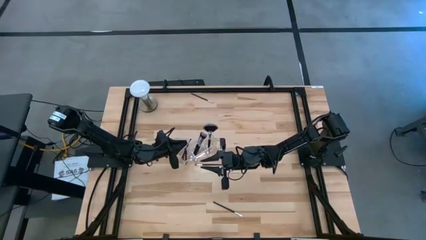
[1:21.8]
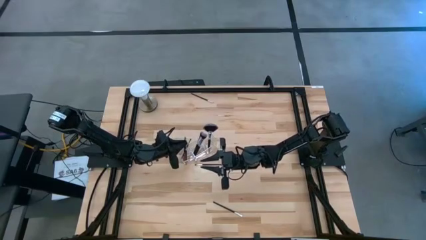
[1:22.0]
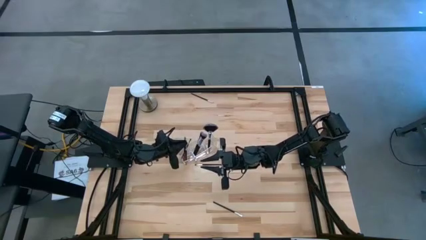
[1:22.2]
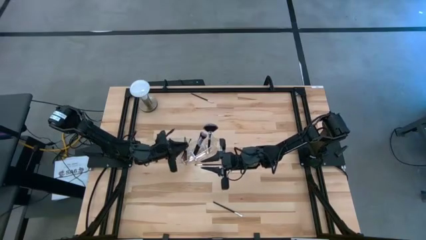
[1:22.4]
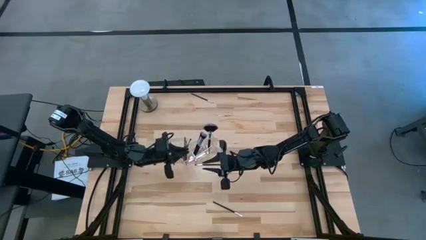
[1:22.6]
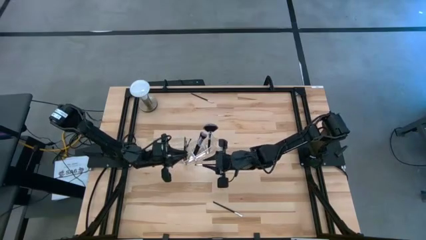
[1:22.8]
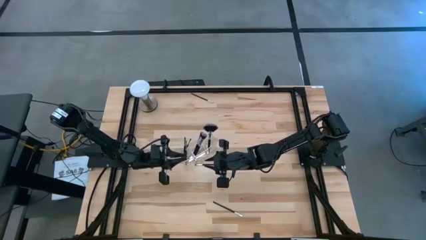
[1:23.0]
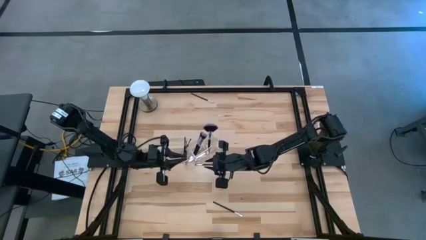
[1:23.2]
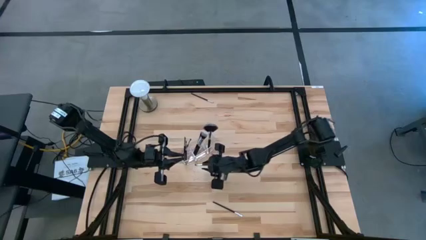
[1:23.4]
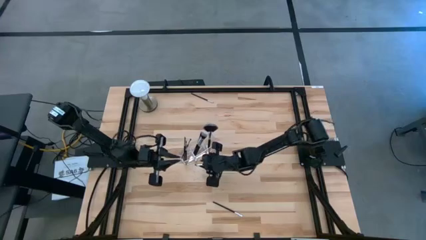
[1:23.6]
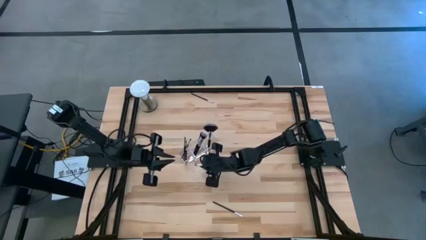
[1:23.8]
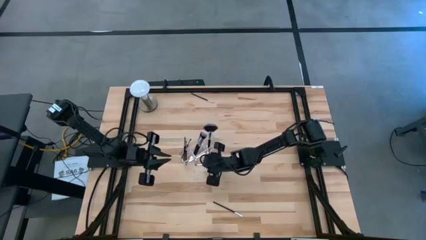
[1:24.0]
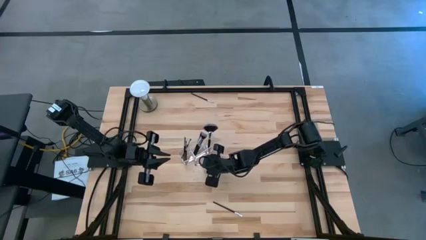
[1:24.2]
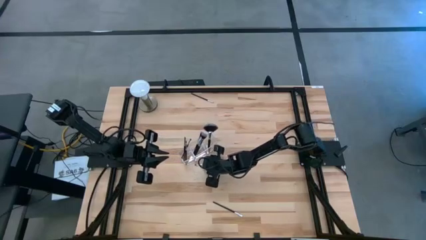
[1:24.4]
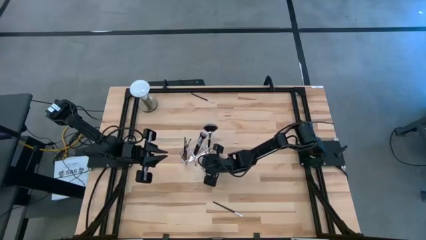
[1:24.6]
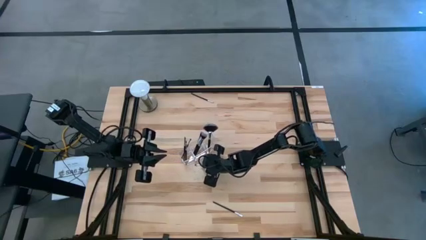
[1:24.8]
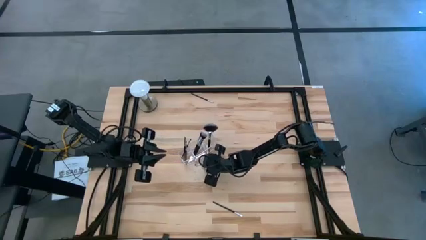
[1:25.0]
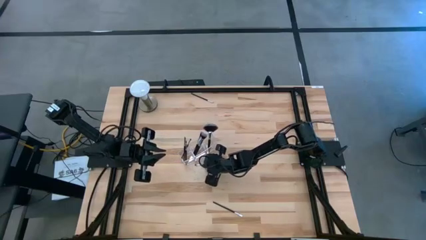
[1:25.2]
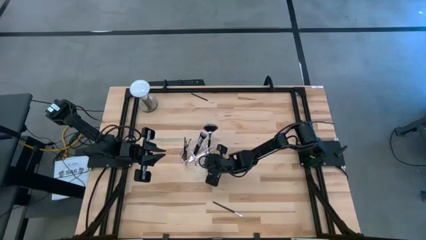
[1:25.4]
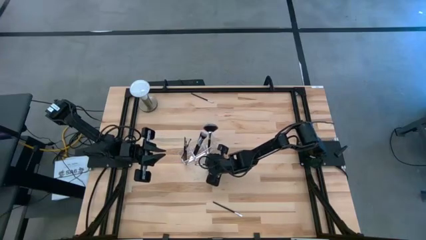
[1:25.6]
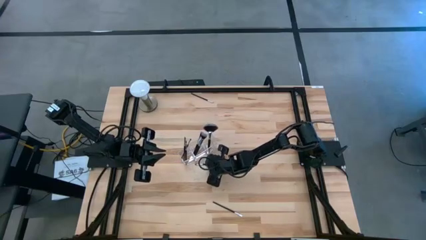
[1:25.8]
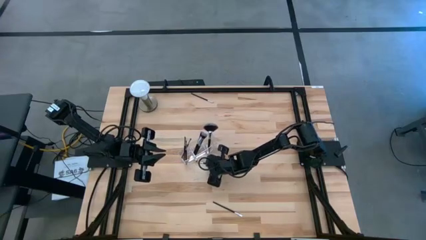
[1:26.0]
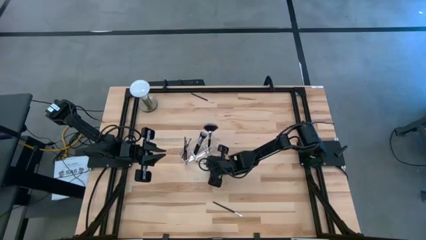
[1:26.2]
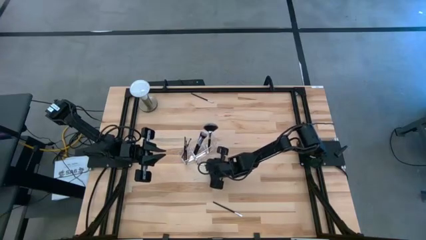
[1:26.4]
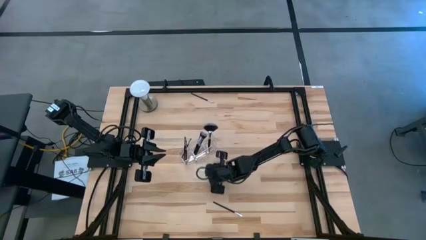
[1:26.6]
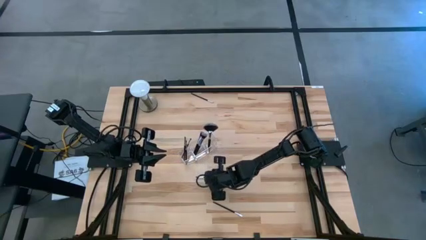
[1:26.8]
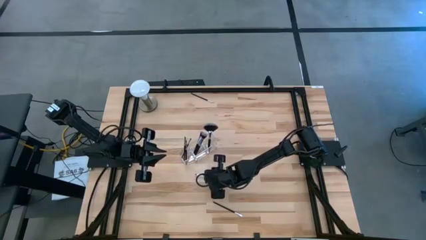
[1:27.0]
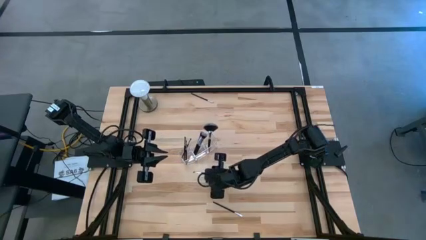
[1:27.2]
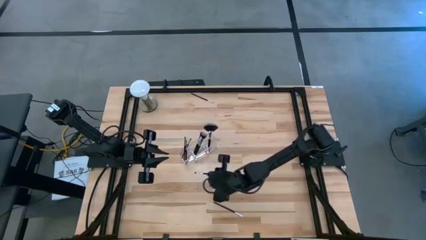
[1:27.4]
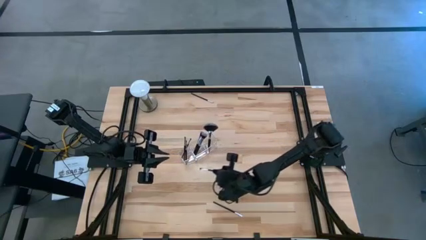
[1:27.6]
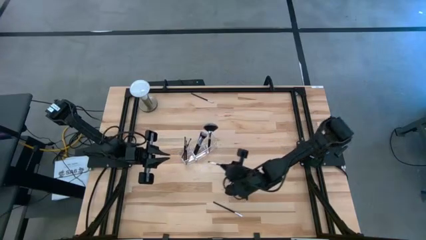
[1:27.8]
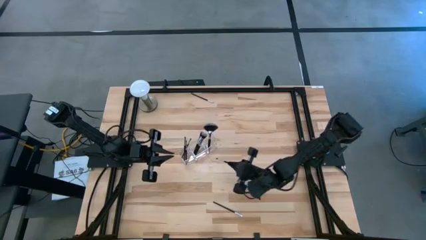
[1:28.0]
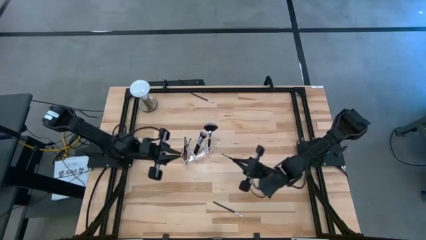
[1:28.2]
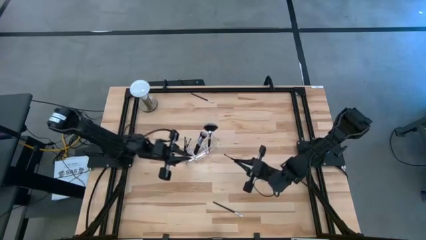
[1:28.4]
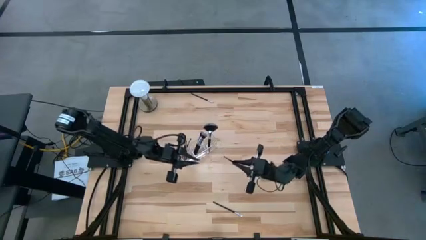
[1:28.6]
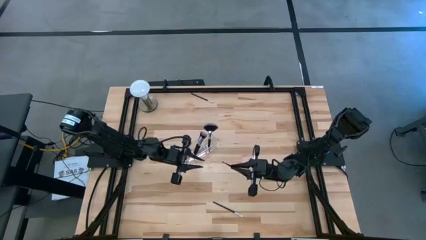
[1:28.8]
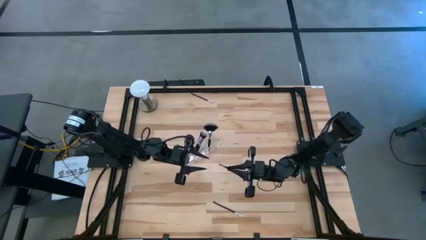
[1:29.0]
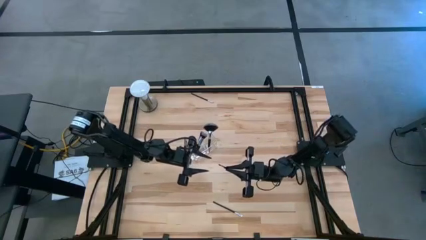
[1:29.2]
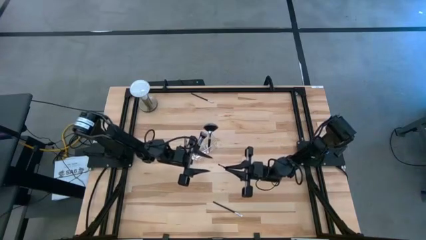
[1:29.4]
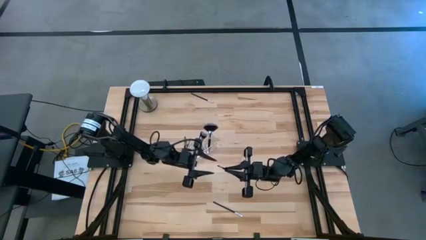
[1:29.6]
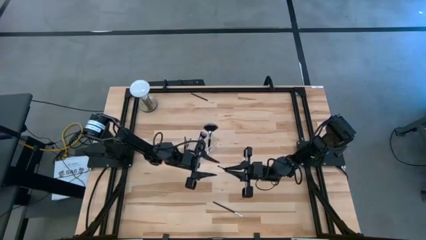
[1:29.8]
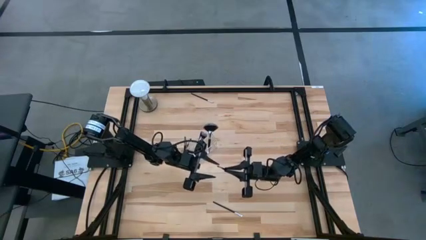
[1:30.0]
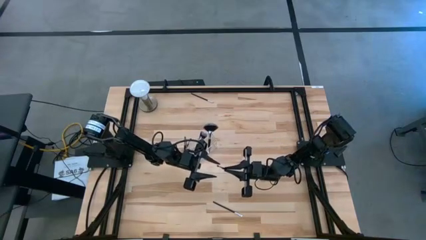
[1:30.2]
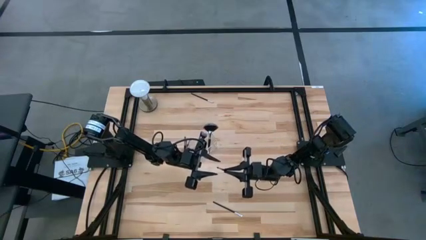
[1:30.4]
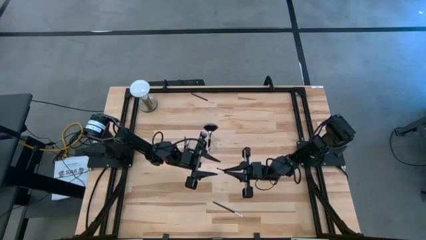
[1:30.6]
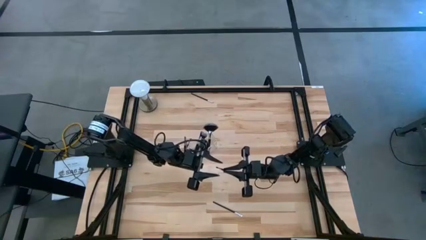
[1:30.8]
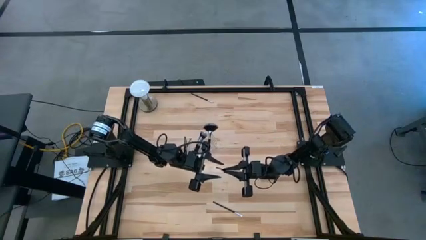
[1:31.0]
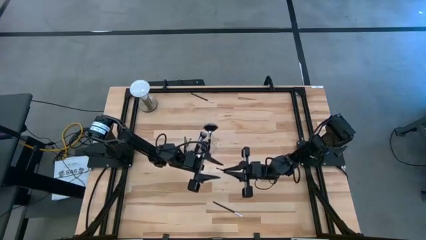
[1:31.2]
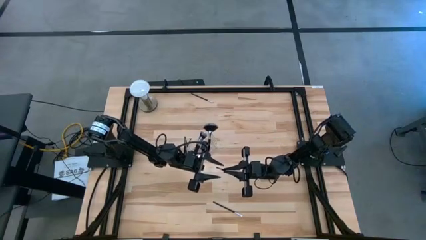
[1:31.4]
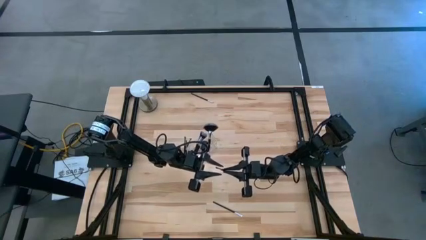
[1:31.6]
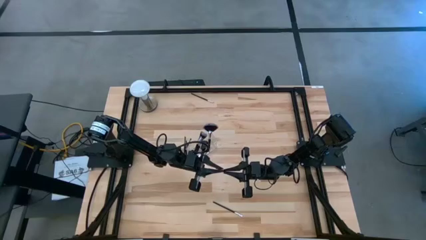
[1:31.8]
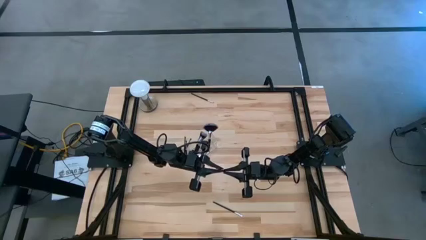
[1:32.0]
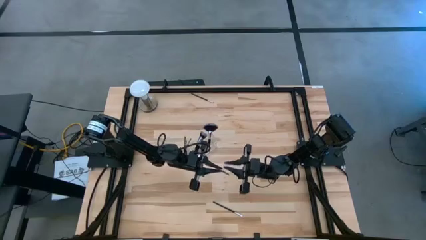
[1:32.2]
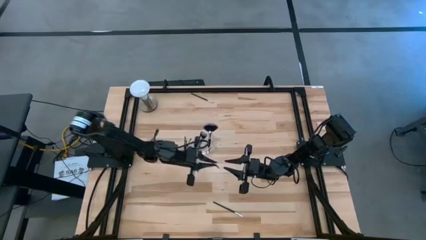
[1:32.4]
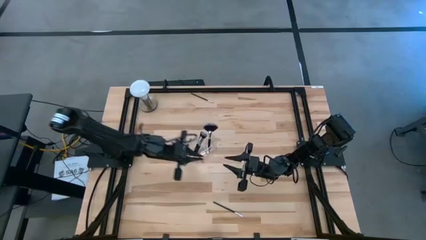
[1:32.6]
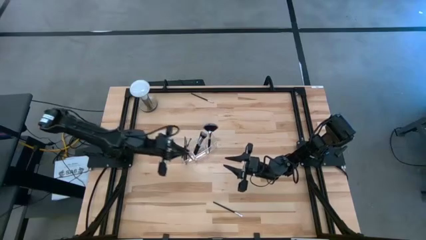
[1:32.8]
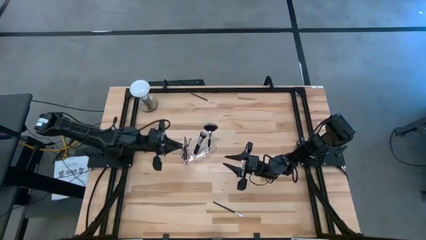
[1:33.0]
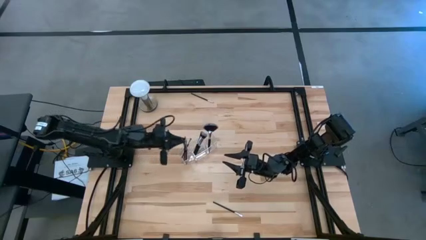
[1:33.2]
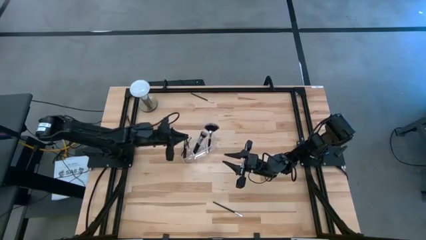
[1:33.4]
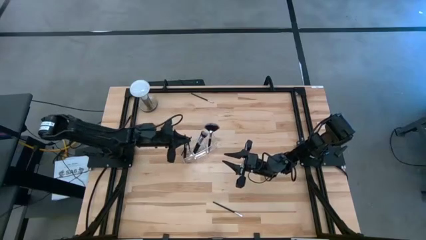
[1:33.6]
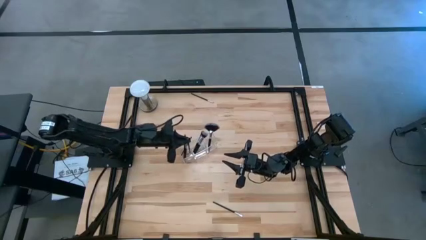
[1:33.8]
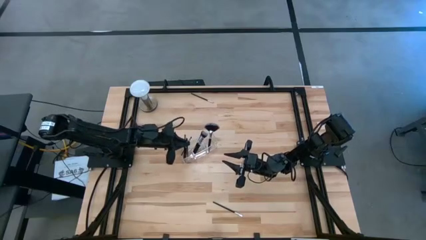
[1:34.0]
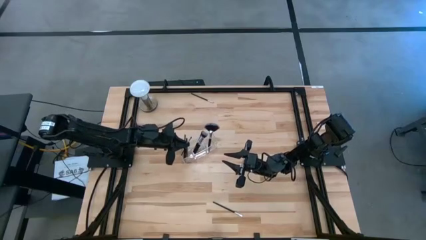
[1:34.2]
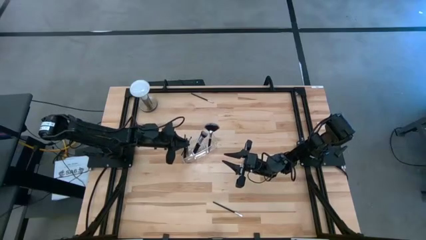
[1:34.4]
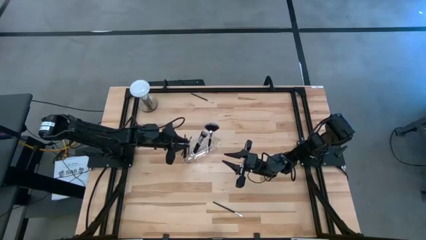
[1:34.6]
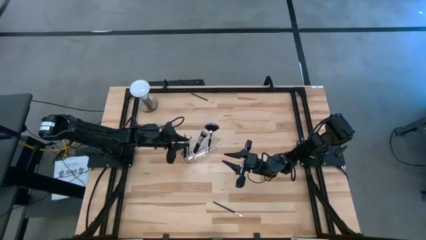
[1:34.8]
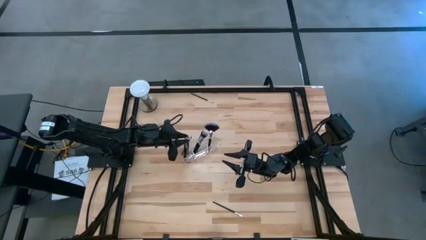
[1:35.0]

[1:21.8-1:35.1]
Task: Put items in baskets/containers
Put the black eyeshadow brush into the left section of the transparent organizer
